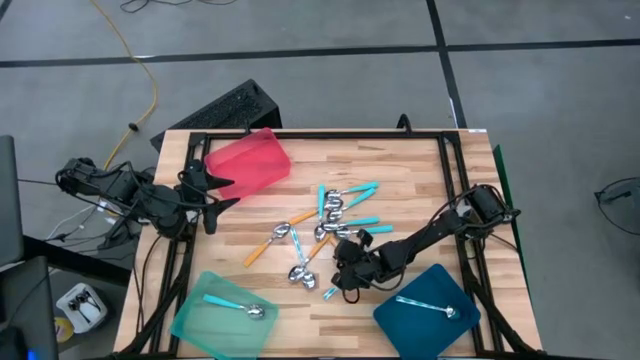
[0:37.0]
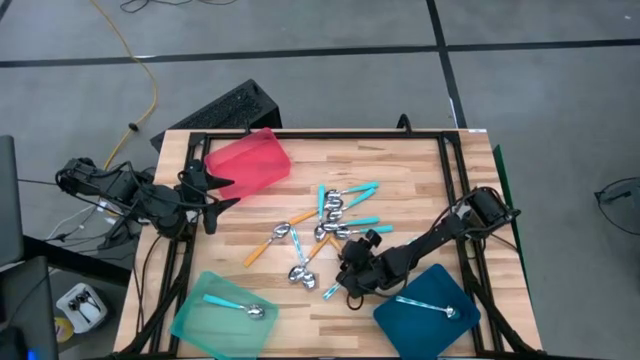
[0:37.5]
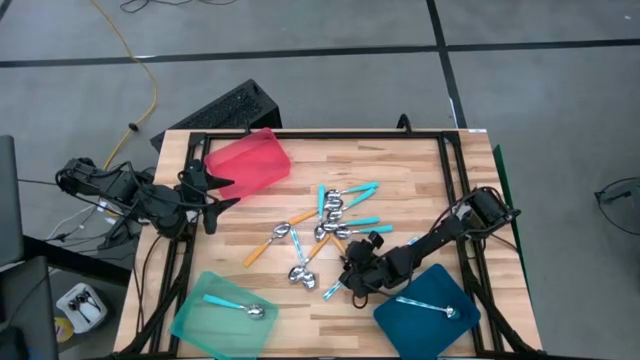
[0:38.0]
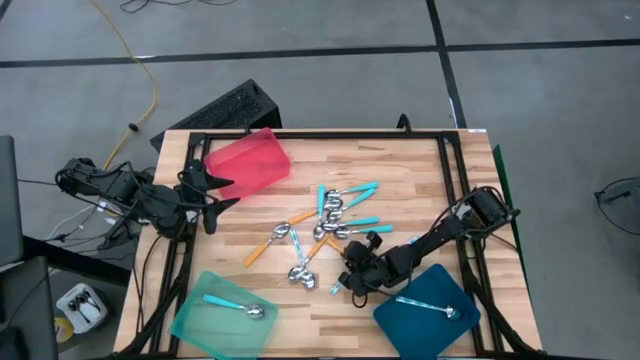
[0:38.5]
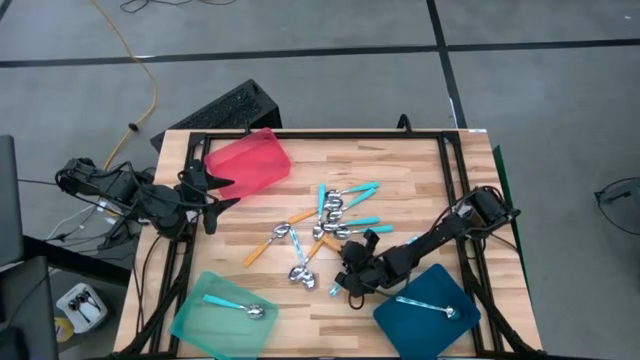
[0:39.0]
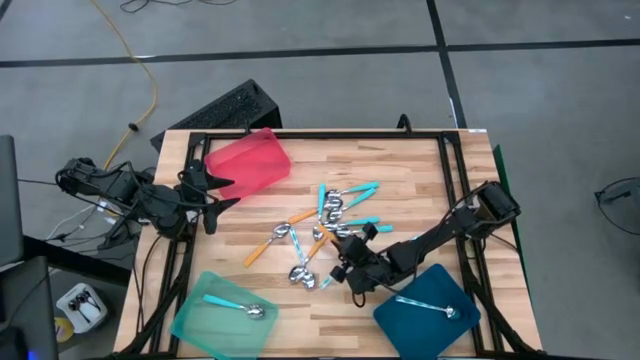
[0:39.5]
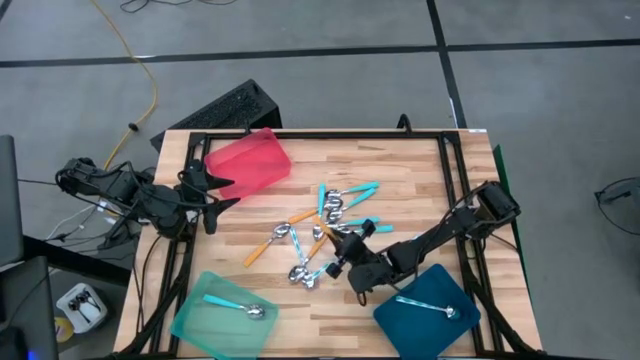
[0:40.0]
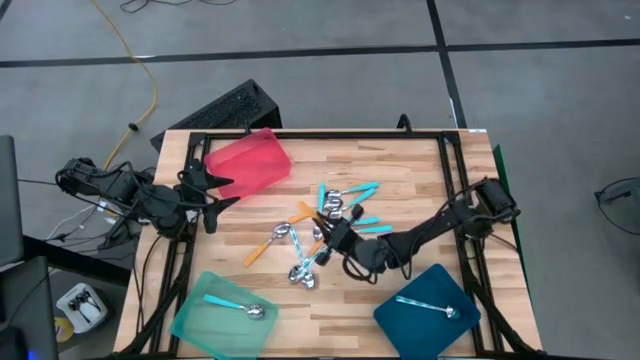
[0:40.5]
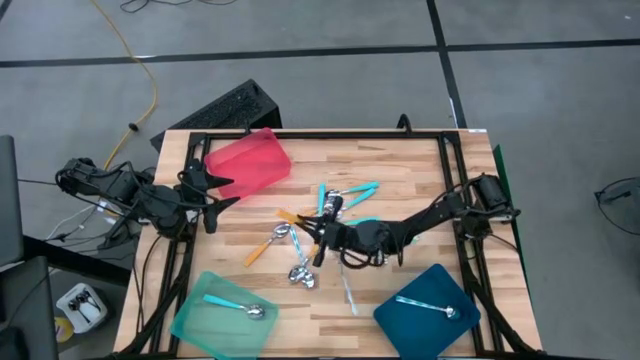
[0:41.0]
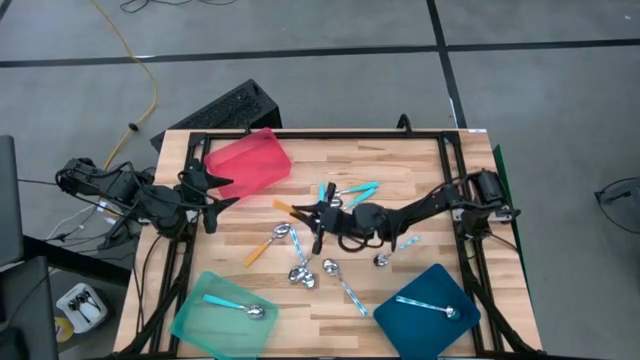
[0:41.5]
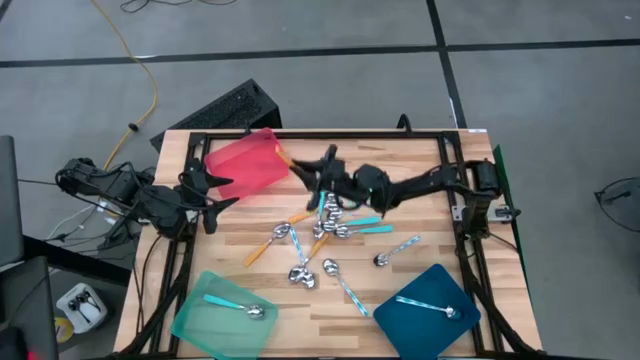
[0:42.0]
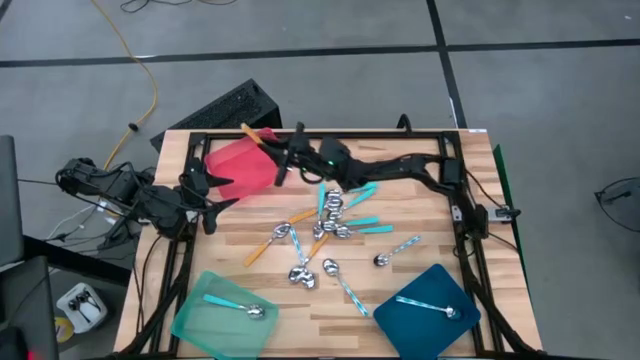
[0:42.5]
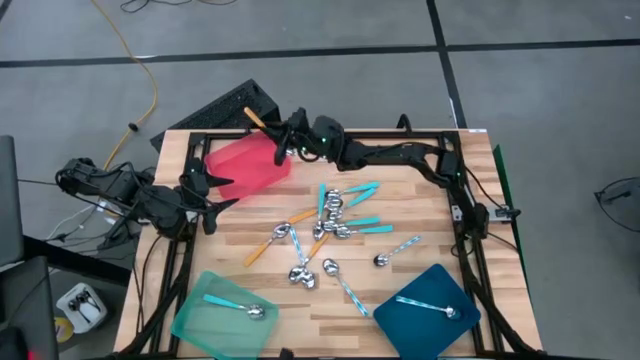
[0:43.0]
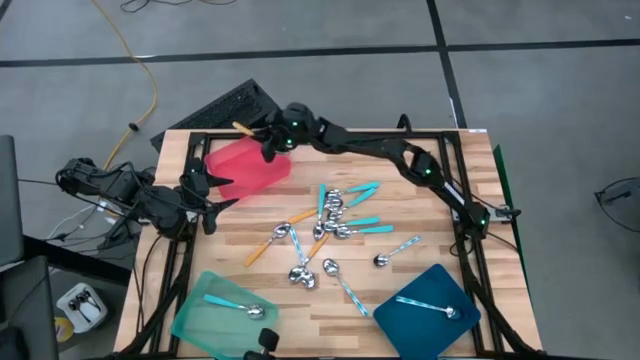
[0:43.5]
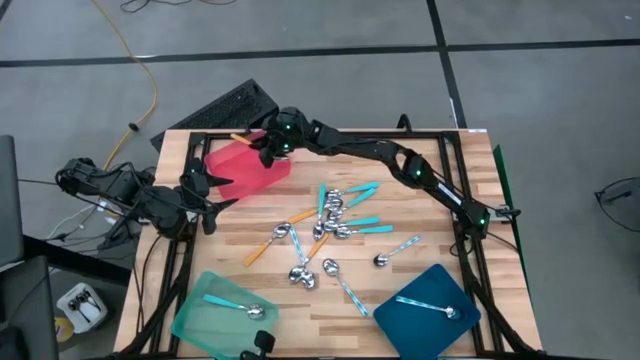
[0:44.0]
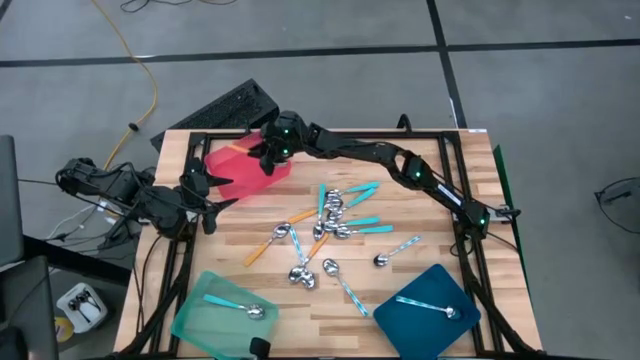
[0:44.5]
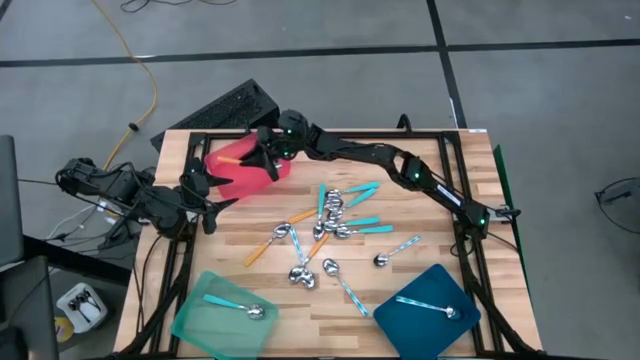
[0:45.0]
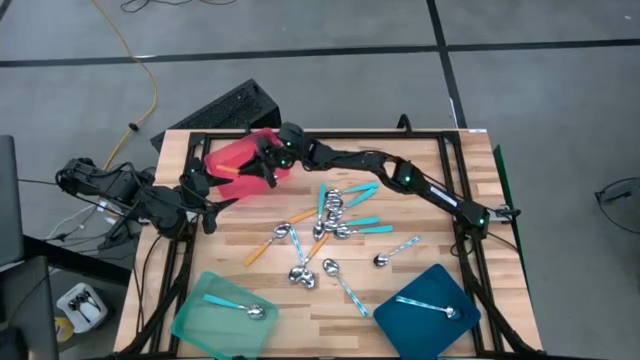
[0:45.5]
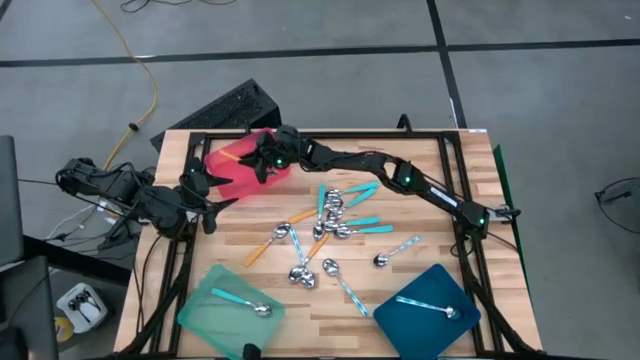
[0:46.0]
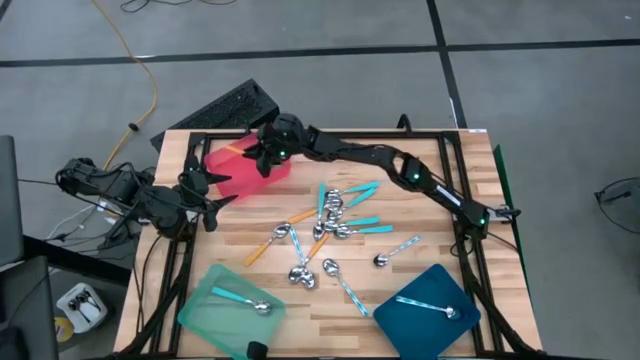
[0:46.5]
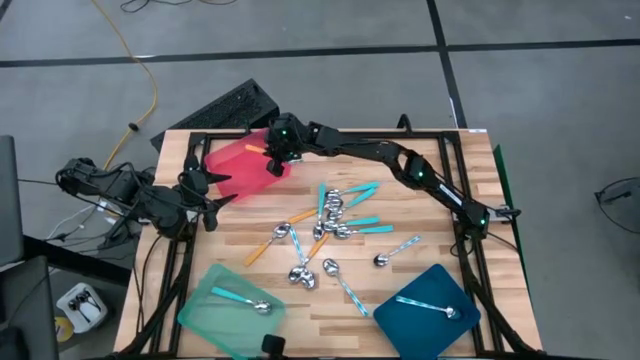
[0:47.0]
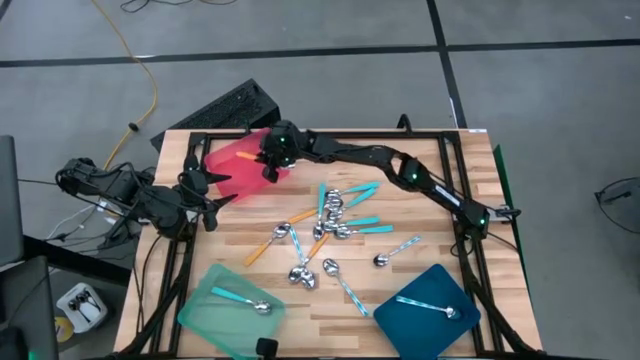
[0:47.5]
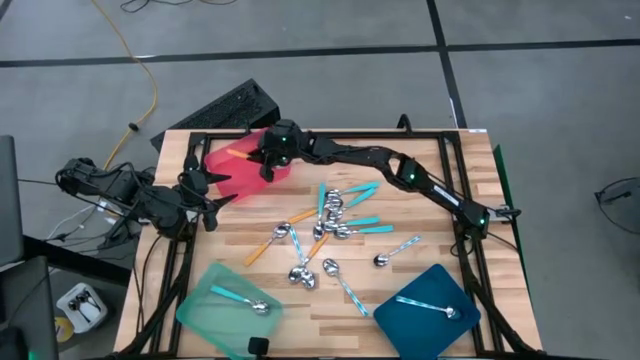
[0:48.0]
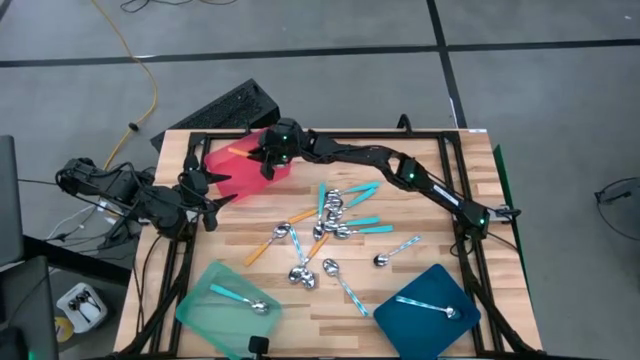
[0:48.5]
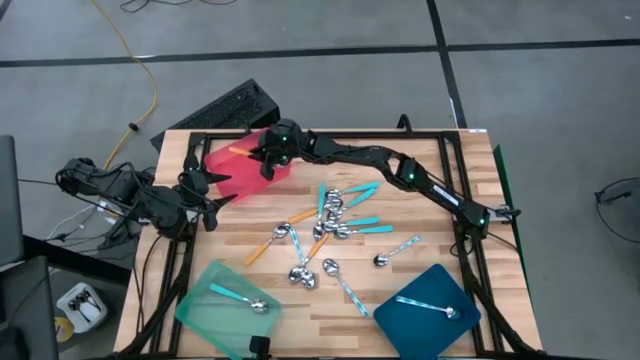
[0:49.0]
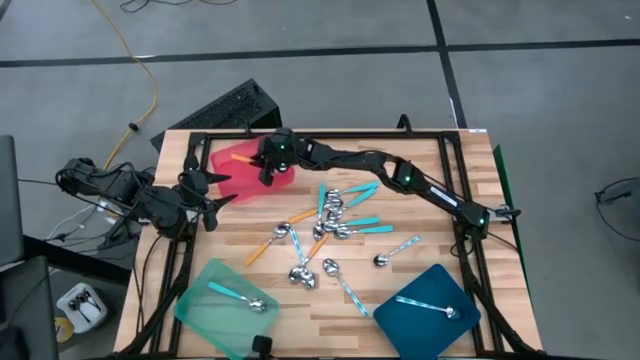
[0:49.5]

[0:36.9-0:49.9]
Task: Sort silverware by color (type)
Put the yellow spoon into the pink bin

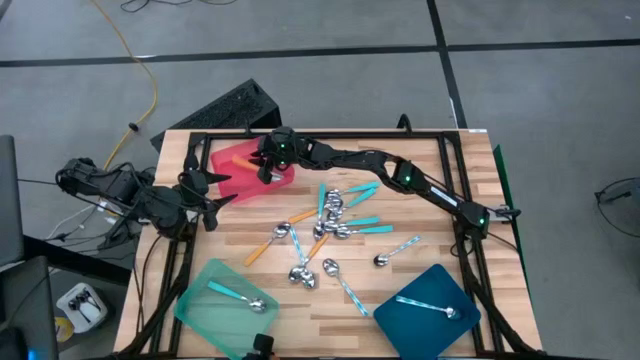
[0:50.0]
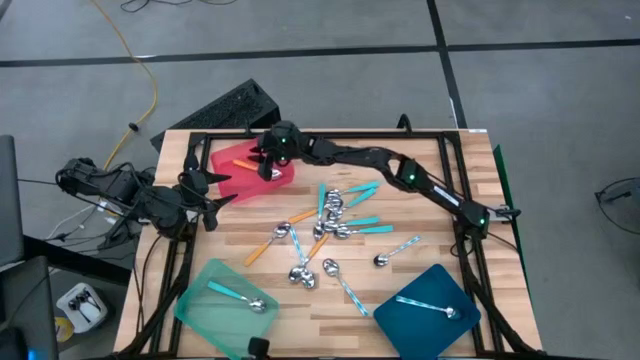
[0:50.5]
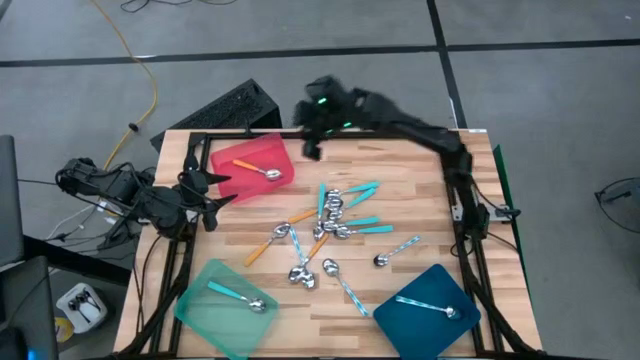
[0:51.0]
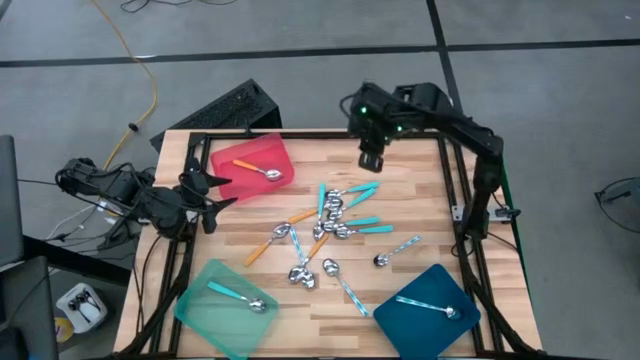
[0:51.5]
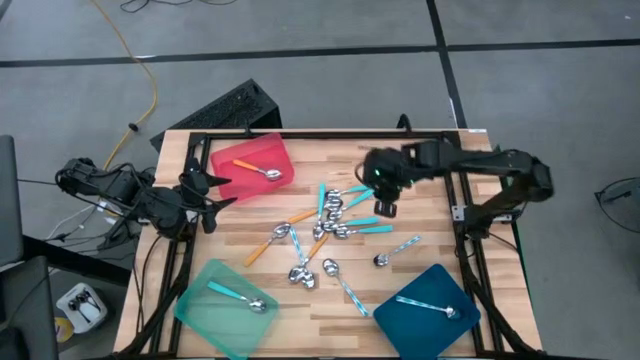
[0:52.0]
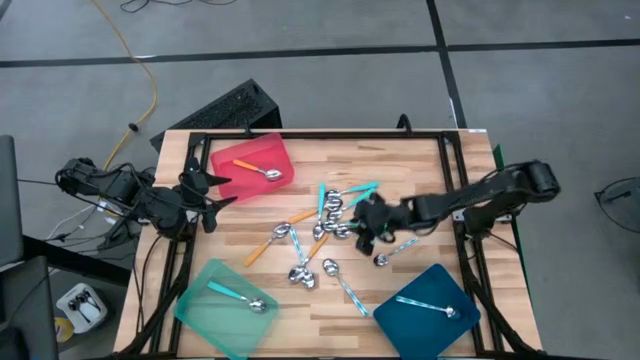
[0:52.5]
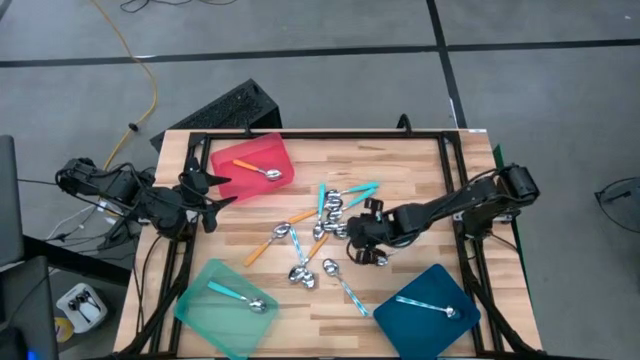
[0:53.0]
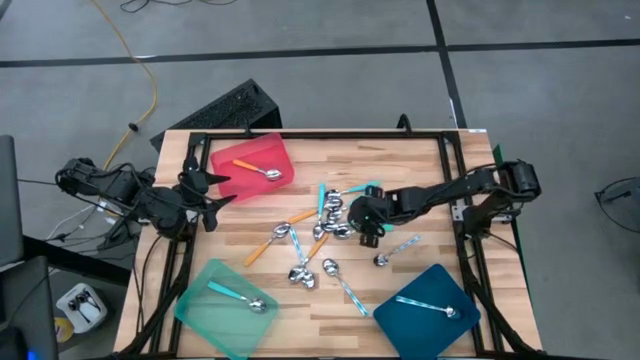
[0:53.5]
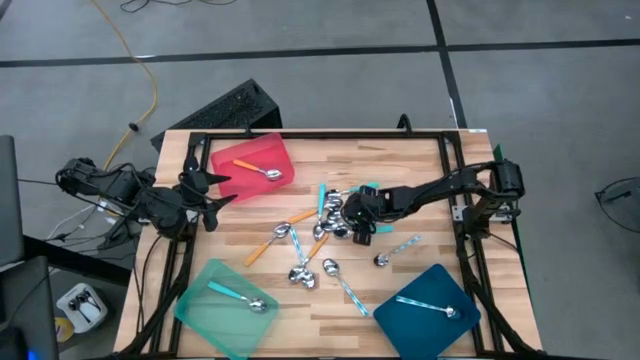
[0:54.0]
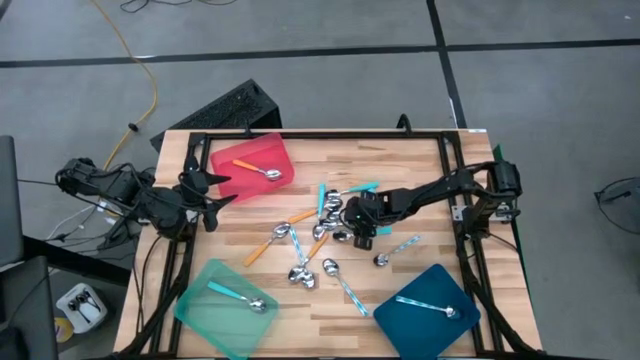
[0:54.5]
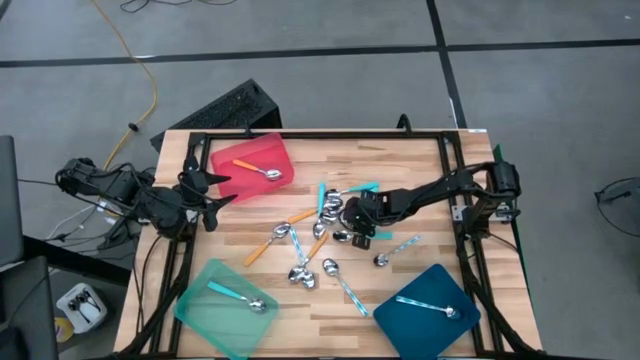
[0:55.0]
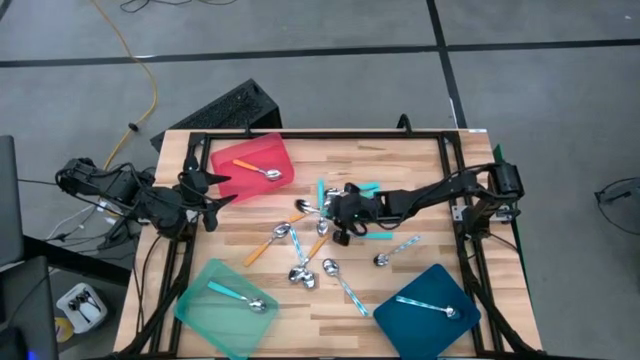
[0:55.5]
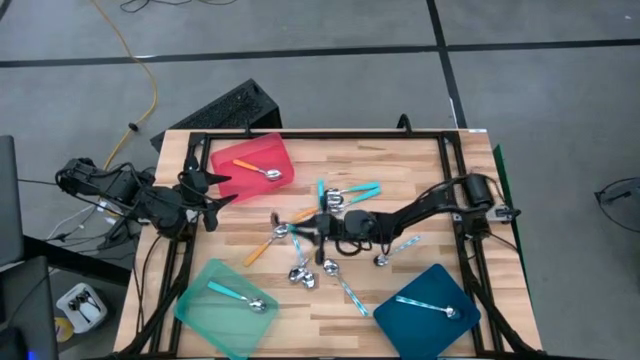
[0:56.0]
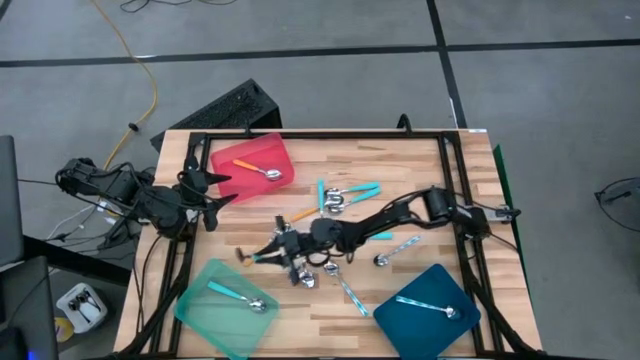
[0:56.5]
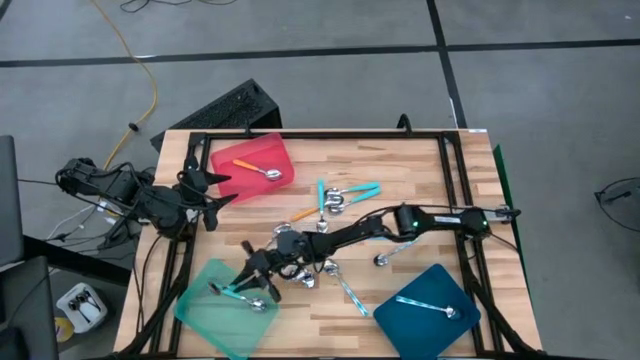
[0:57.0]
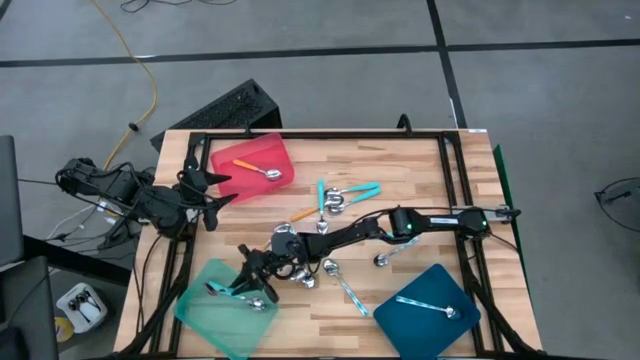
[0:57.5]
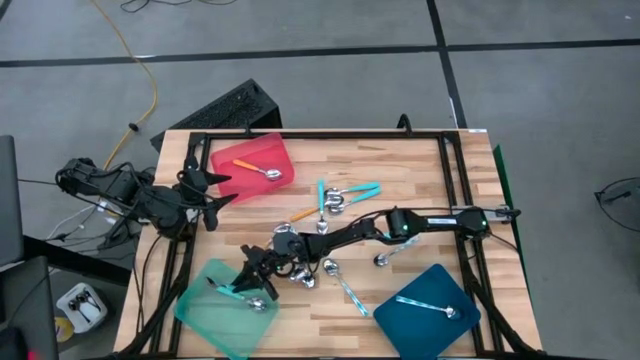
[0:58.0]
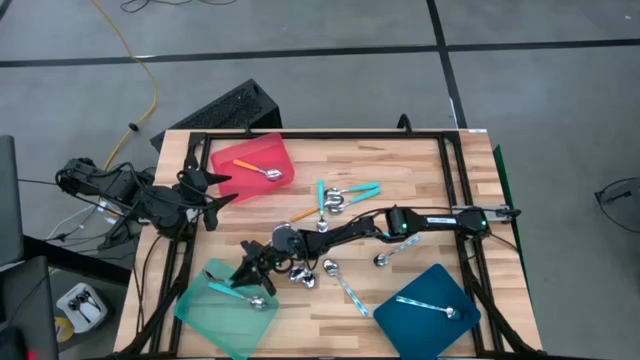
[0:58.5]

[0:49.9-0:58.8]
Put the blue spoon into the light blue bin
